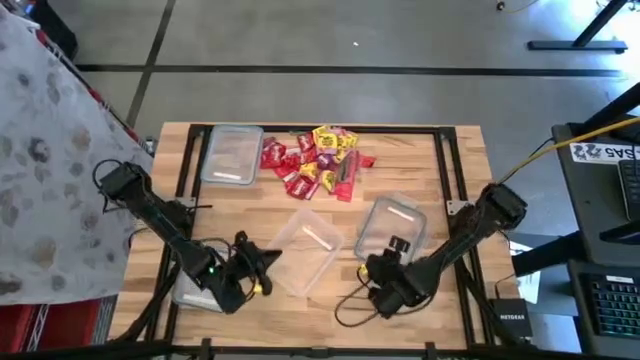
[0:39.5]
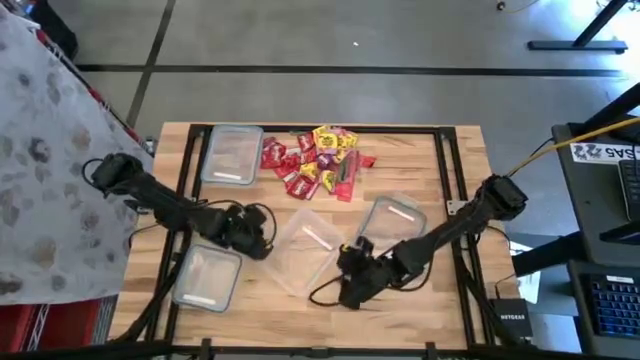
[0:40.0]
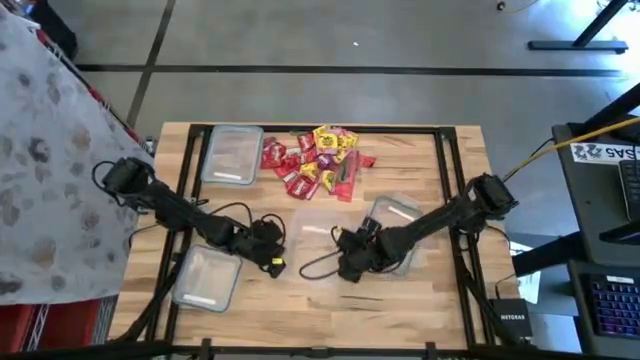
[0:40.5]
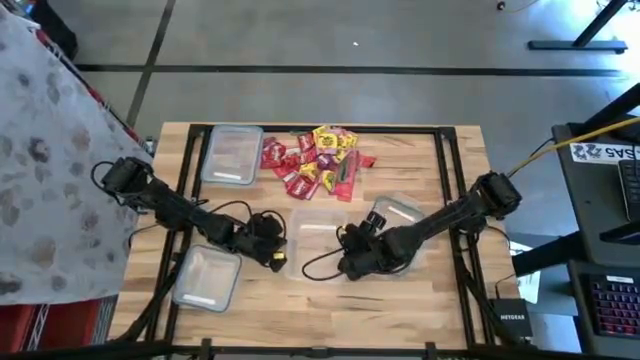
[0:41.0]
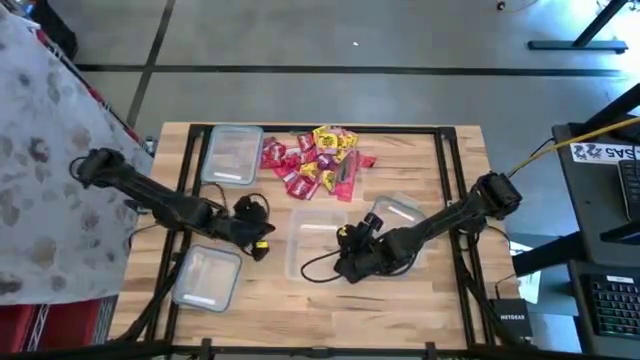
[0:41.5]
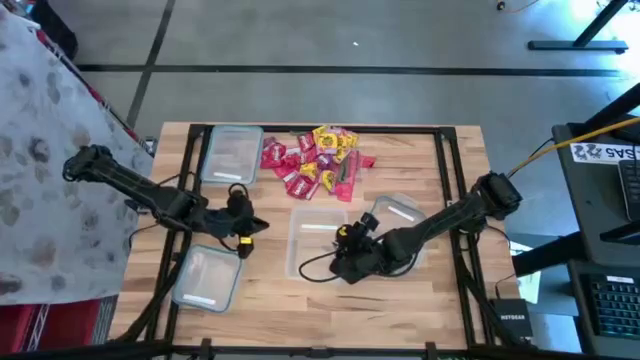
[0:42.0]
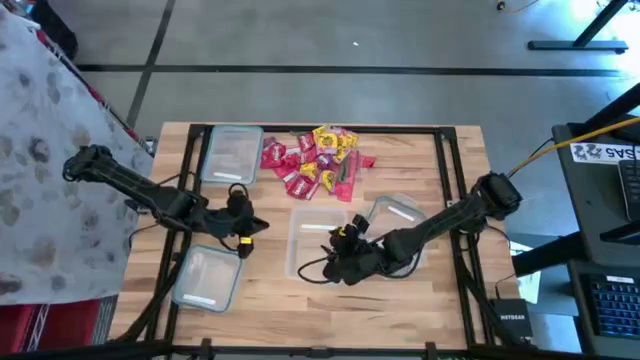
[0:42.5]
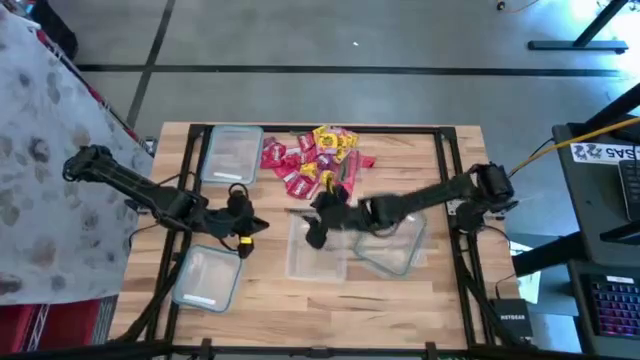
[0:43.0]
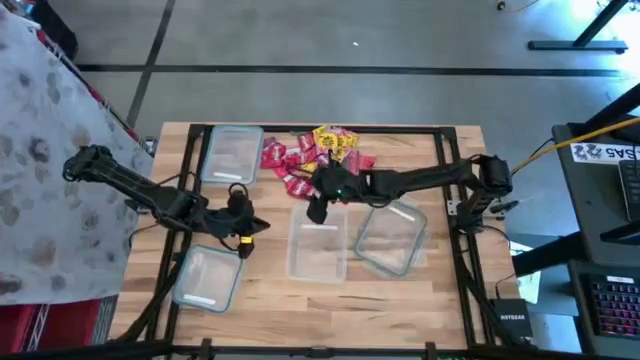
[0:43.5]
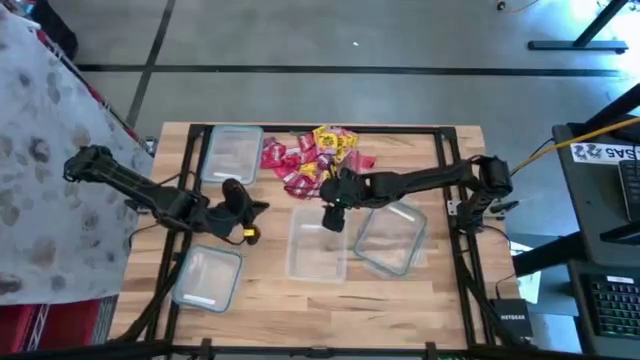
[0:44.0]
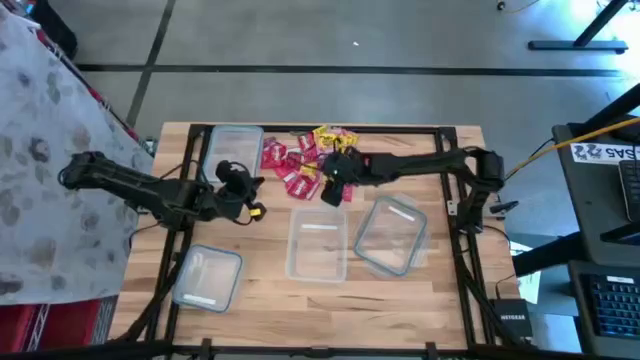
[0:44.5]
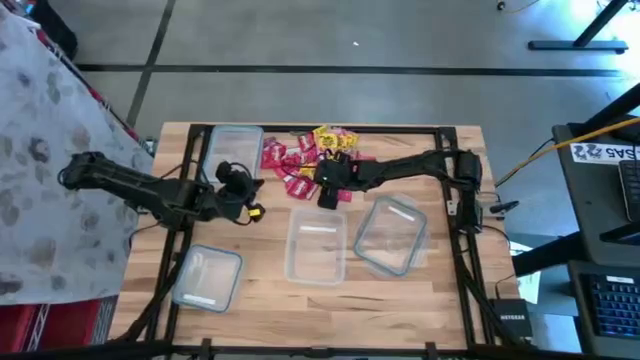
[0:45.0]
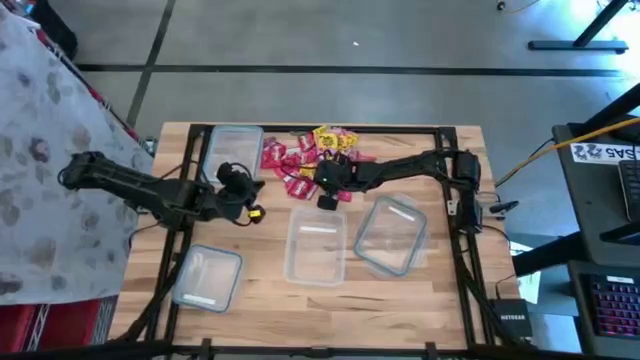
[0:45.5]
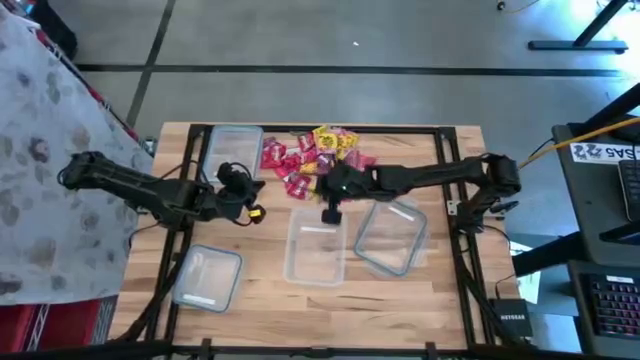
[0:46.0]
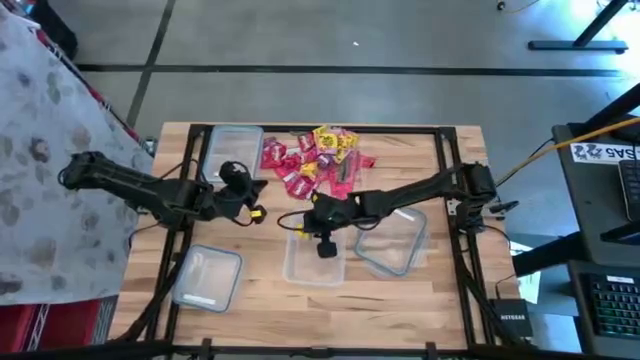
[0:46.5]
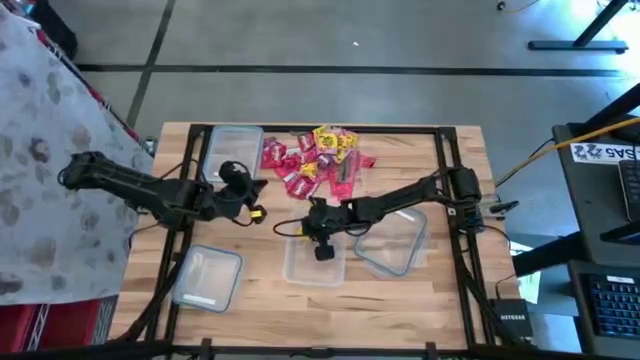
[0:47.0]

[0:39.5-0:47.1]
Task: Sort candy
Put the yellow candy into the right transparent bin

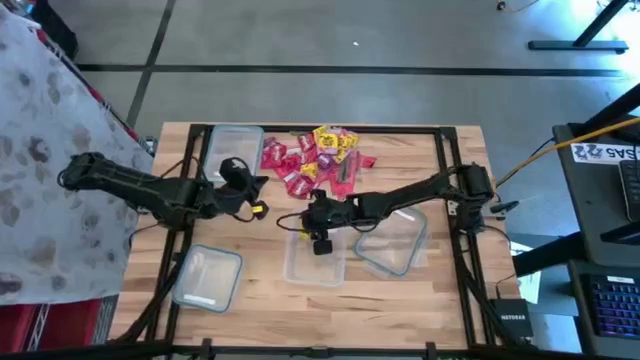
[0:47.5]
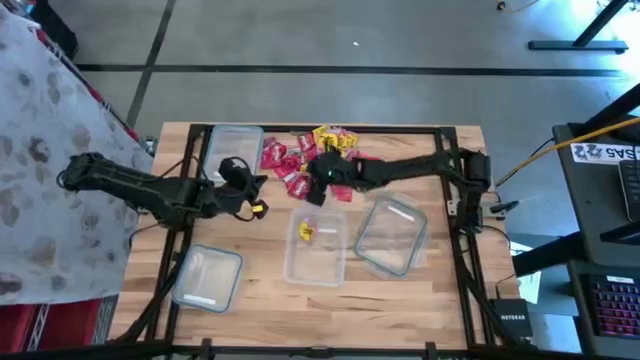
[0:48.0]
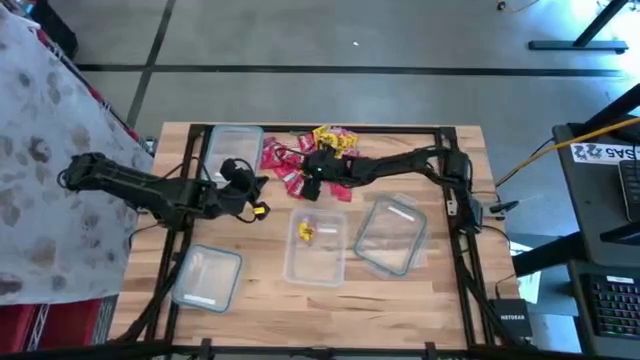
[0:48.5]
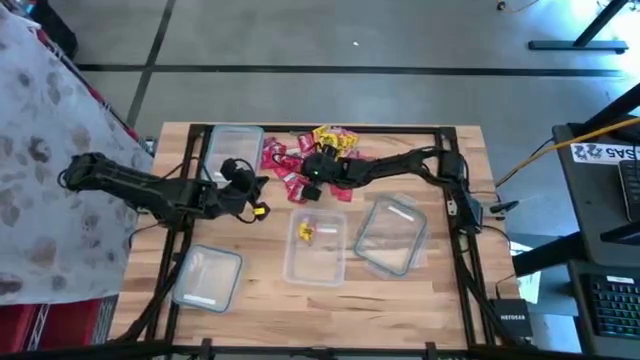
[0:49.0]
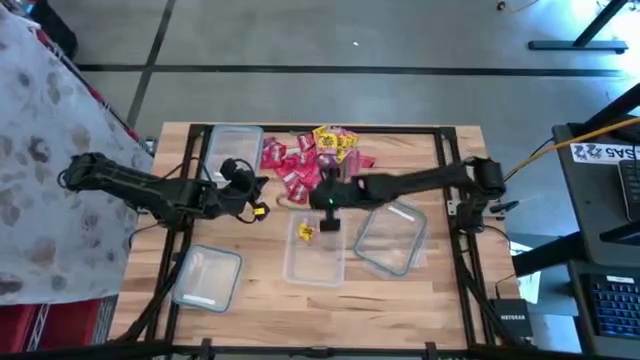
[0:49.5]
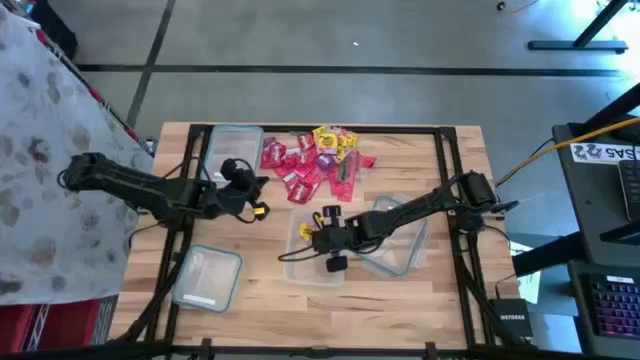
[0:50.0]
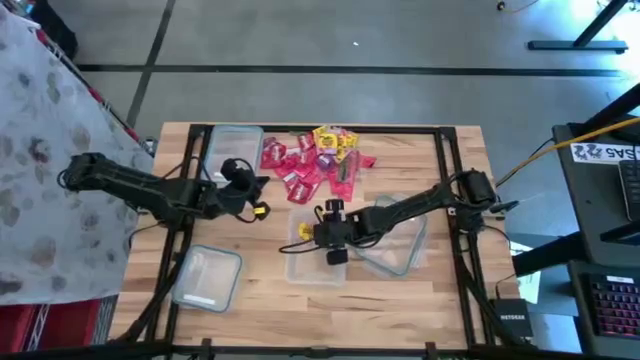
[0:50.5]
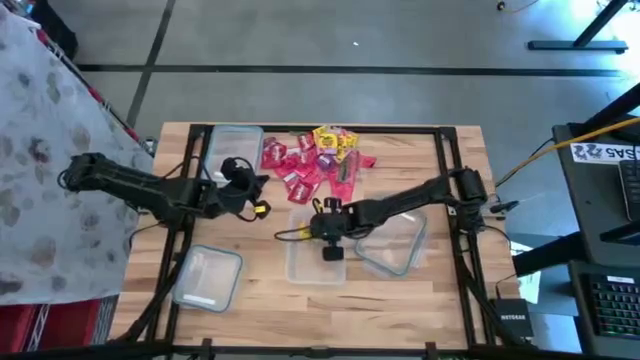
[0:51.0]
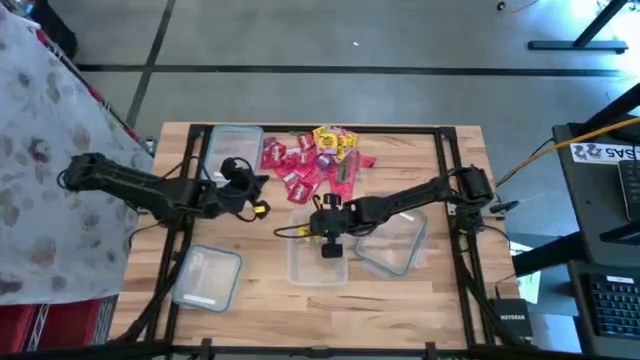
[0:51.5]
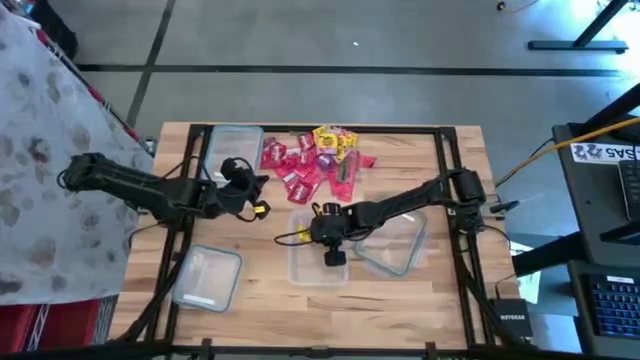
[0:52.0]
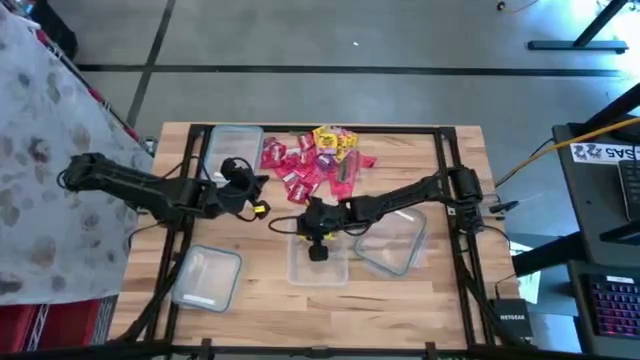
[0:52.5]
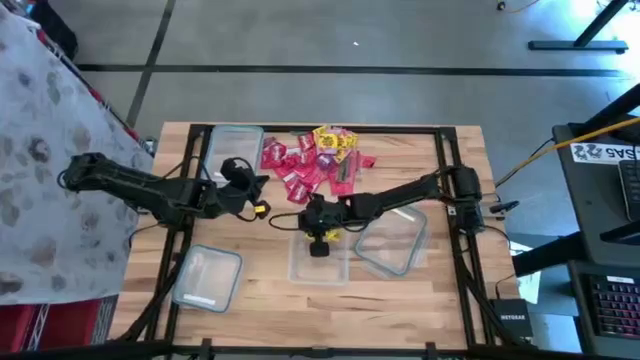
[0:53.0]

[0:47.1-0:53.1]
Put the yellow candy into the right transparent bin

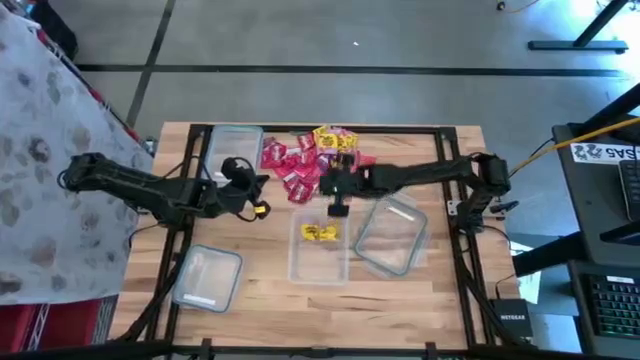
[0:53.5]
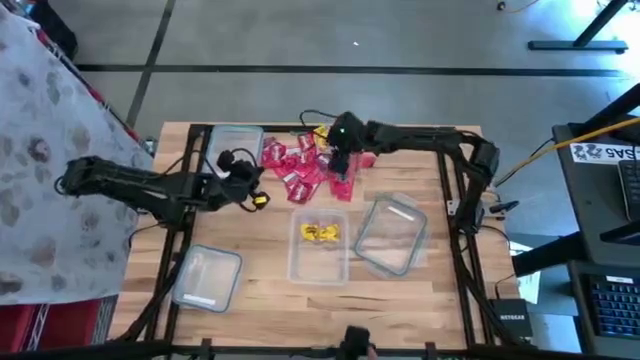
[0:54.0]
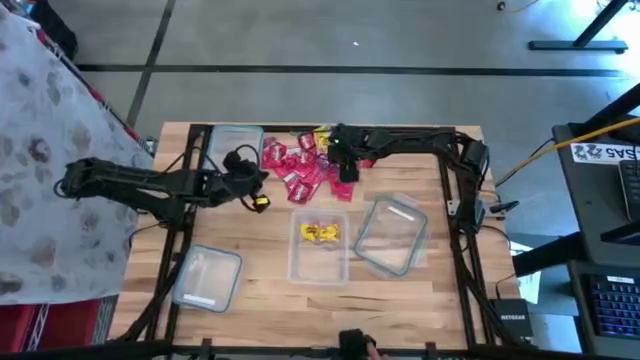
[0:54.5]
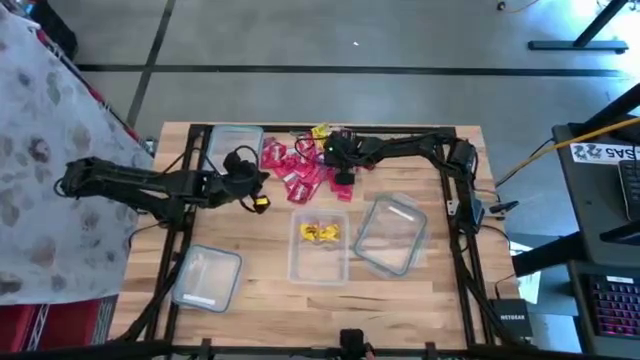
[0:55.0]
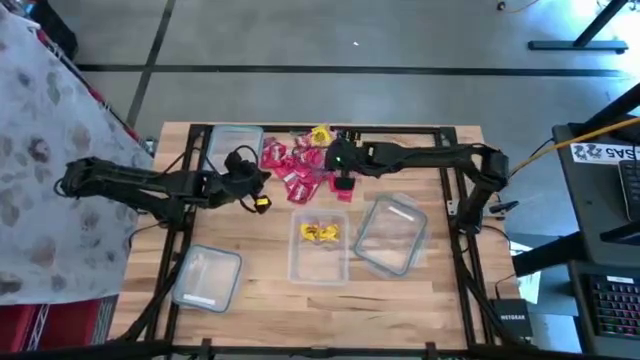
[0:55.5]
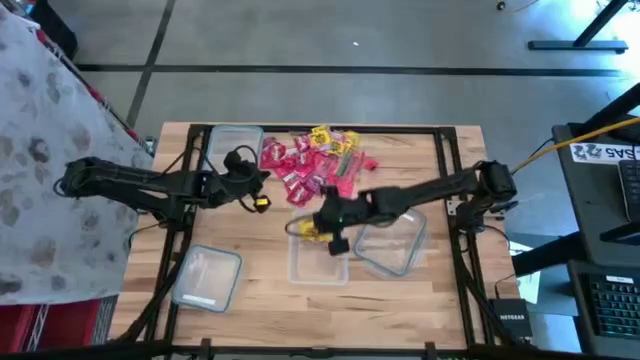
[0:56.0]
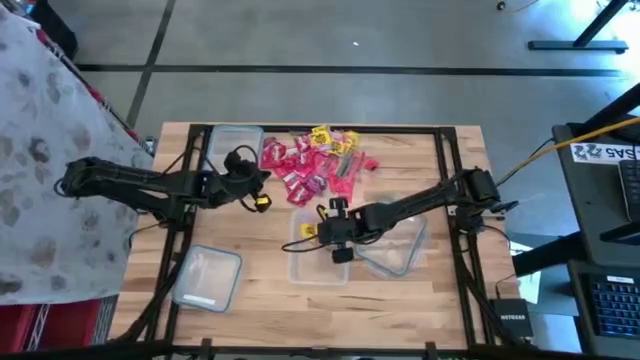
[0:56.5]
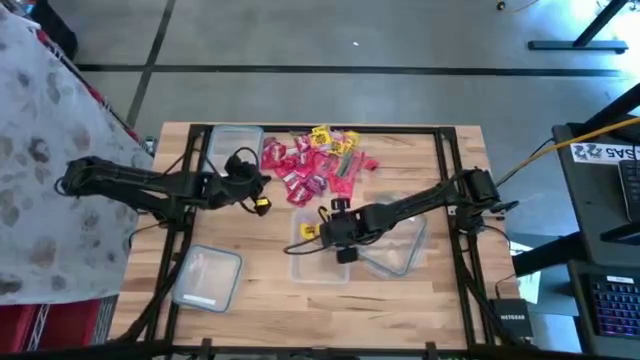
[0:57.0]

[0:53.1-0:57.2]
Put the yellow candy into the right transparent bin

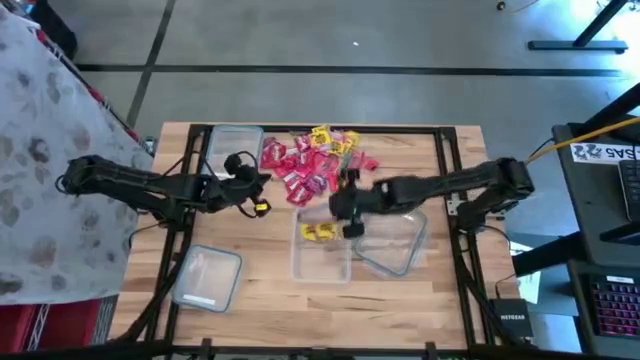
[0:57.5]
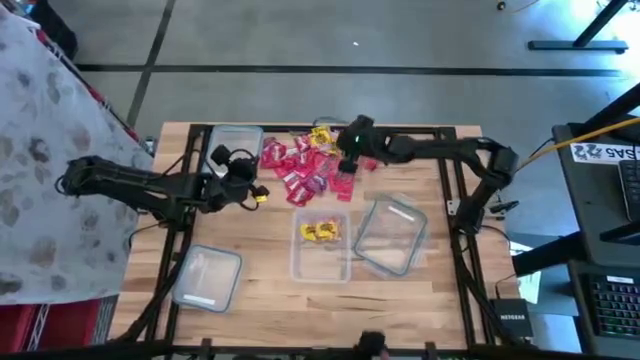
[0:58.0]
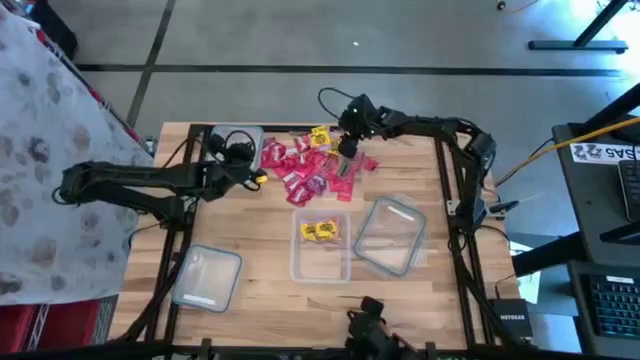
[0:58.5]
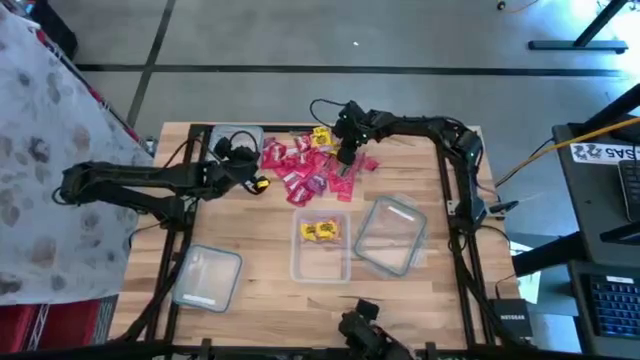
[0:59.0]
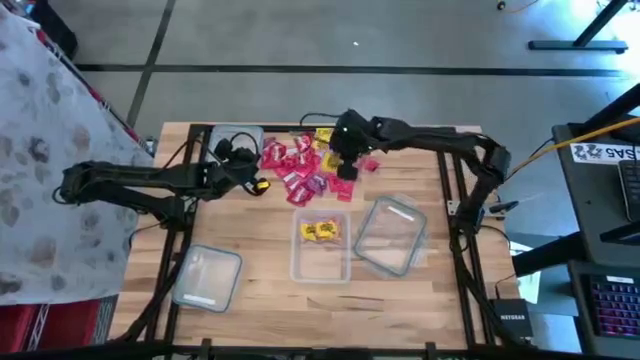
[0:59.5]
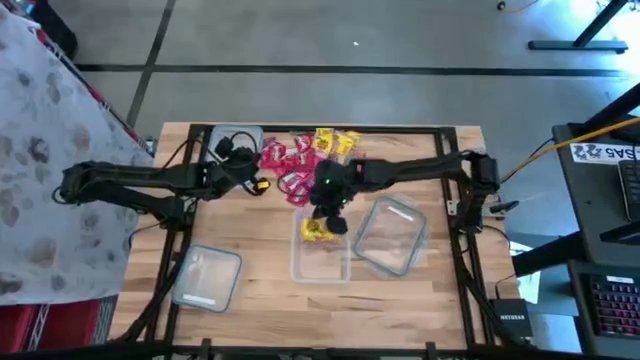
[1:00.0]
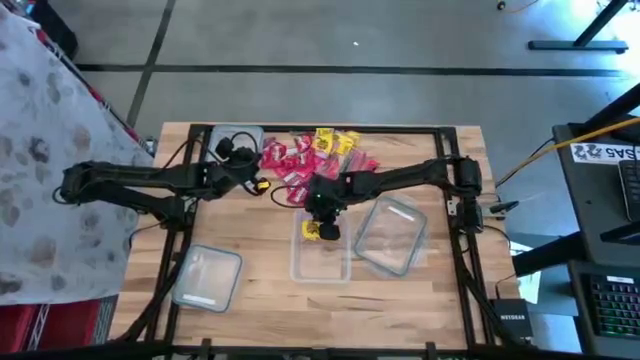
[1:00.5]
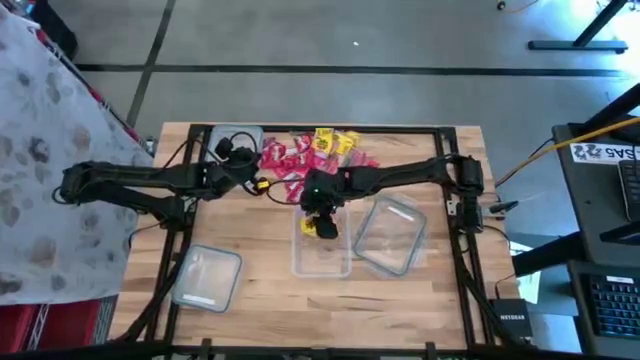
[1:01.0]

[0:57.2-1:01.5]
Put the yellow candy into the right transparent bin
